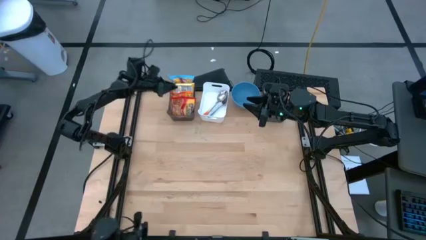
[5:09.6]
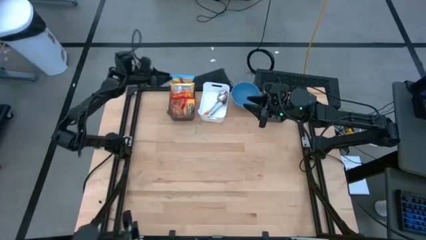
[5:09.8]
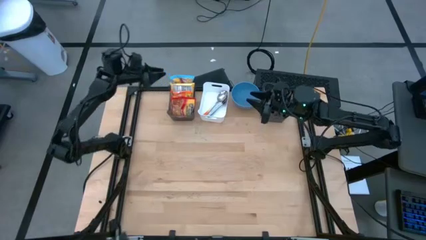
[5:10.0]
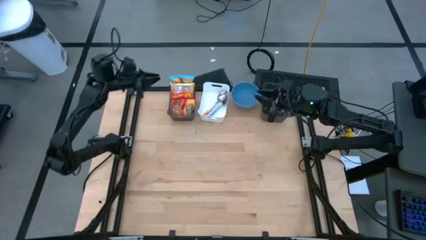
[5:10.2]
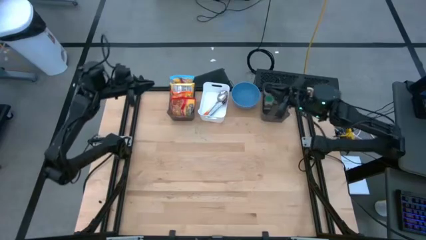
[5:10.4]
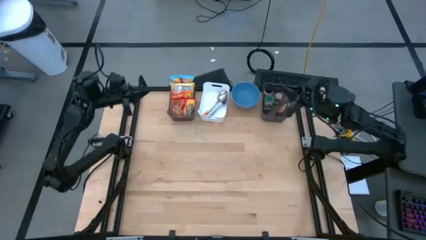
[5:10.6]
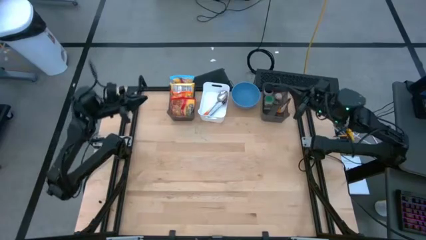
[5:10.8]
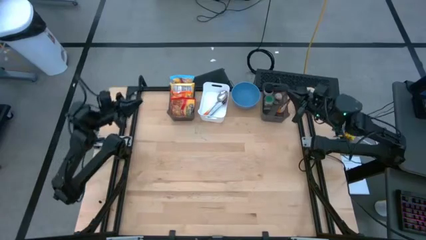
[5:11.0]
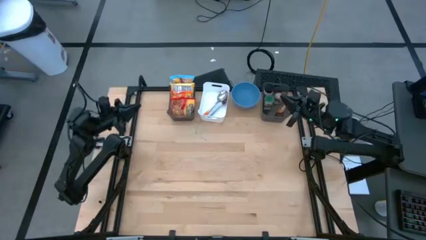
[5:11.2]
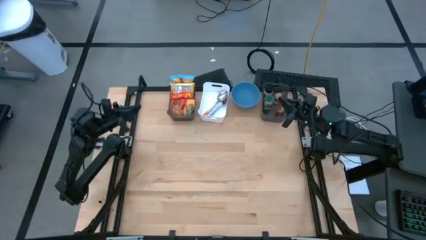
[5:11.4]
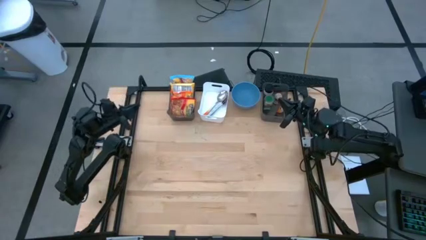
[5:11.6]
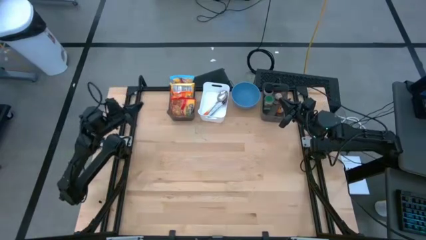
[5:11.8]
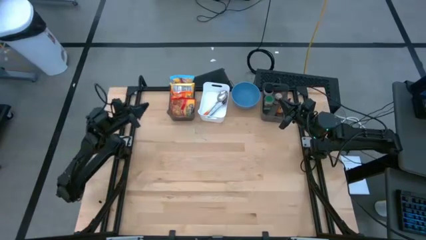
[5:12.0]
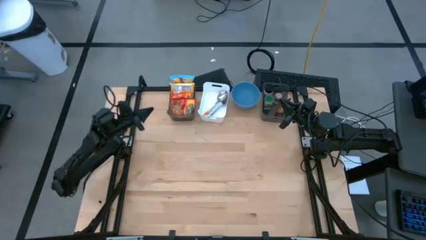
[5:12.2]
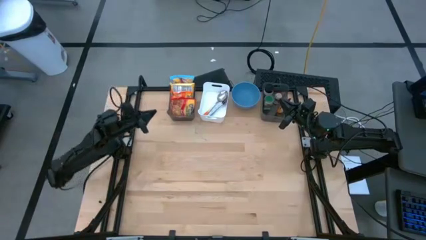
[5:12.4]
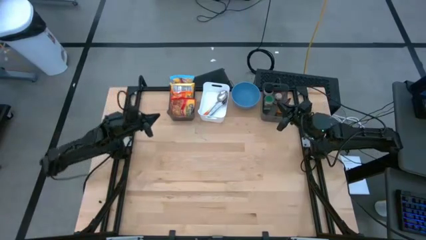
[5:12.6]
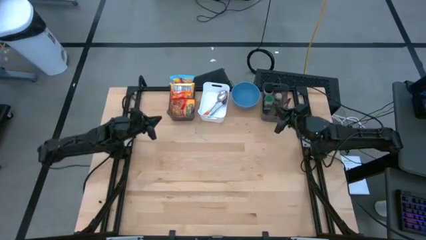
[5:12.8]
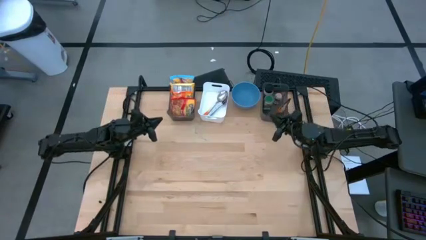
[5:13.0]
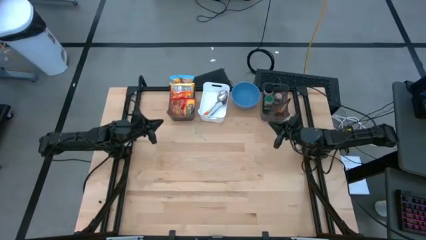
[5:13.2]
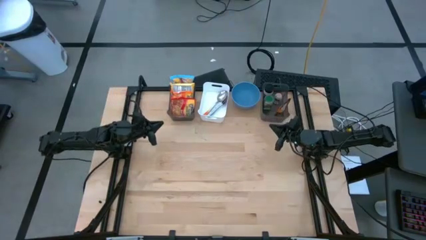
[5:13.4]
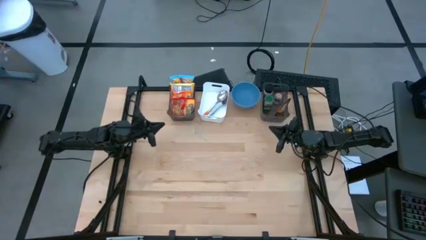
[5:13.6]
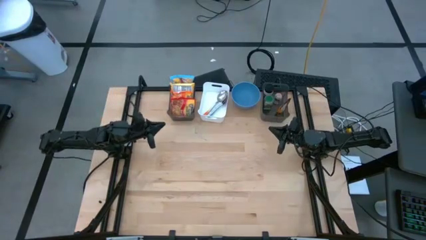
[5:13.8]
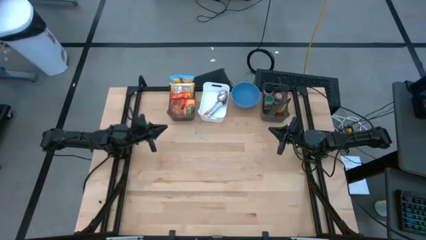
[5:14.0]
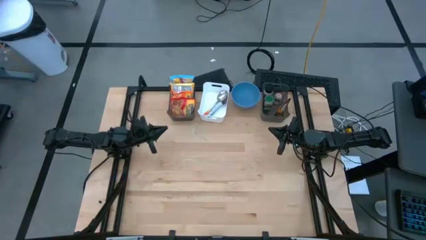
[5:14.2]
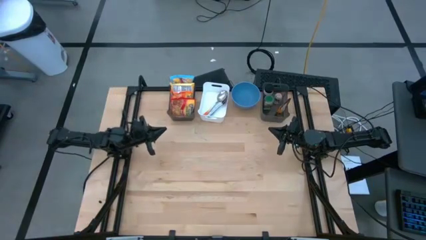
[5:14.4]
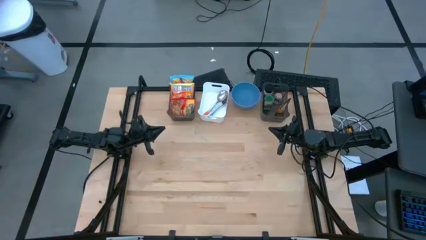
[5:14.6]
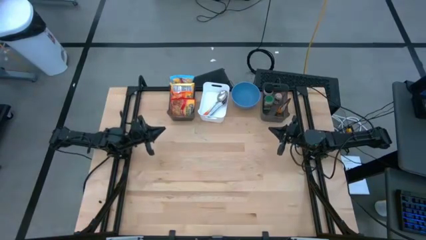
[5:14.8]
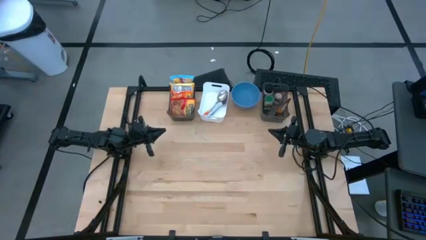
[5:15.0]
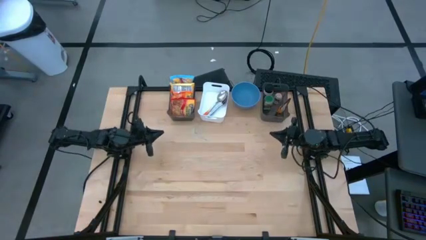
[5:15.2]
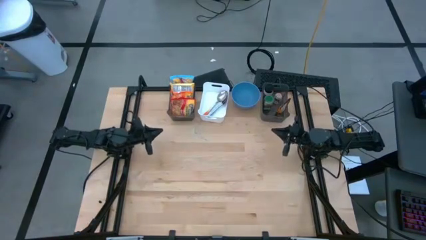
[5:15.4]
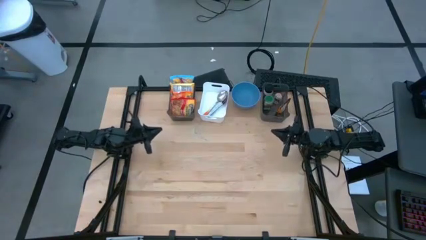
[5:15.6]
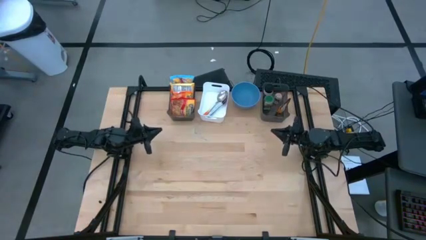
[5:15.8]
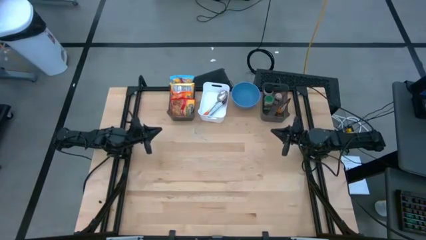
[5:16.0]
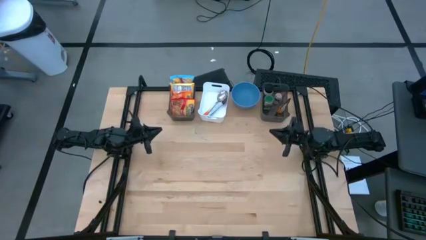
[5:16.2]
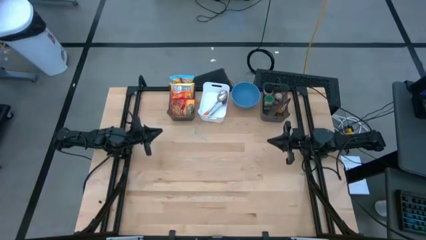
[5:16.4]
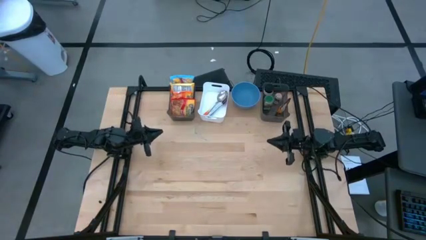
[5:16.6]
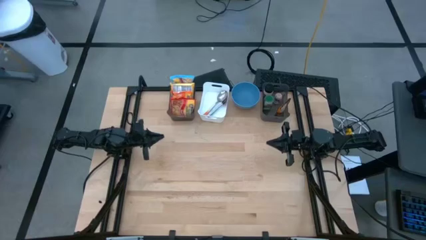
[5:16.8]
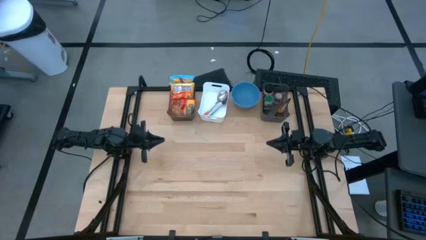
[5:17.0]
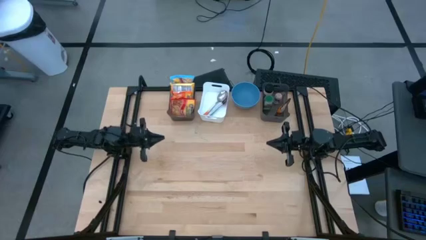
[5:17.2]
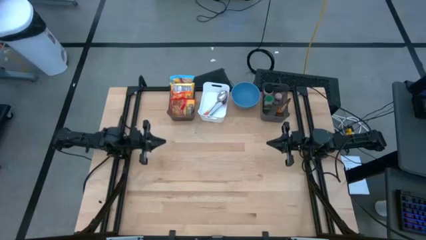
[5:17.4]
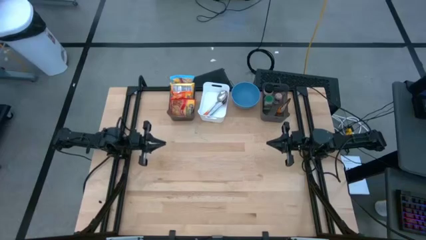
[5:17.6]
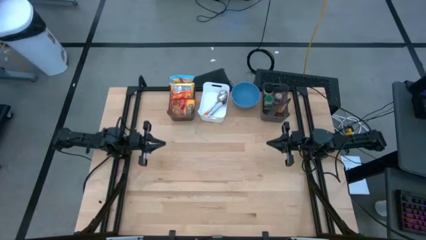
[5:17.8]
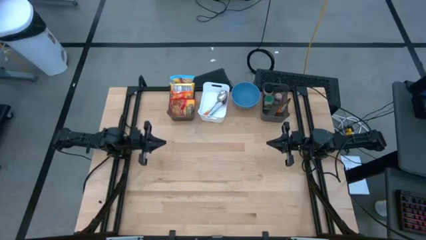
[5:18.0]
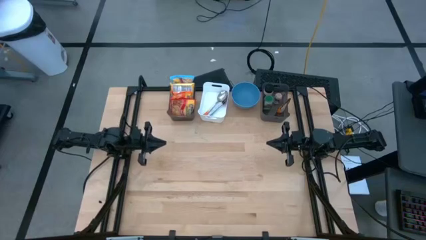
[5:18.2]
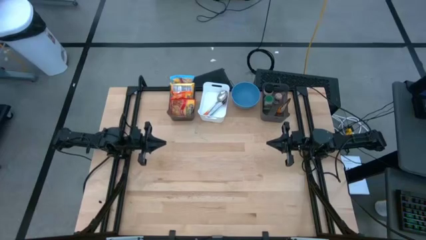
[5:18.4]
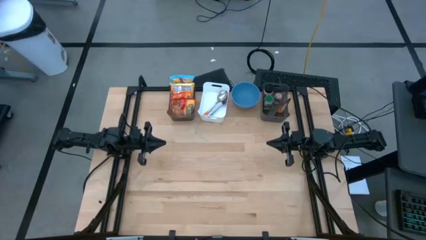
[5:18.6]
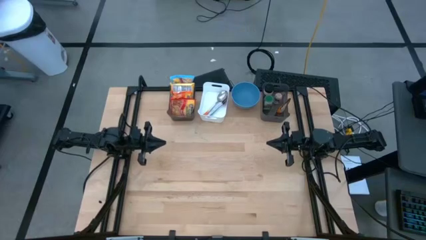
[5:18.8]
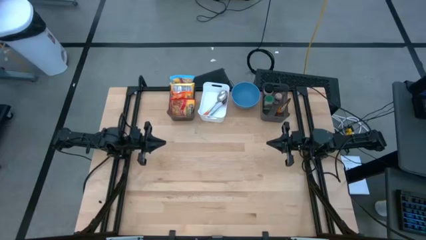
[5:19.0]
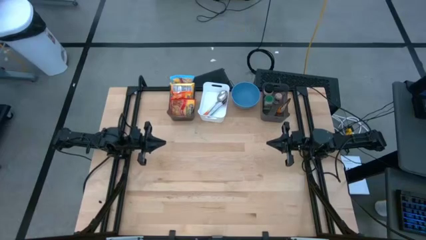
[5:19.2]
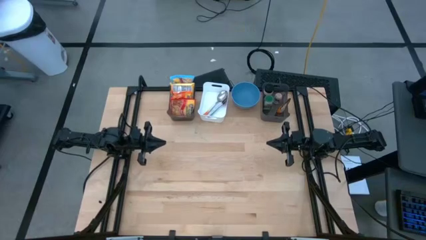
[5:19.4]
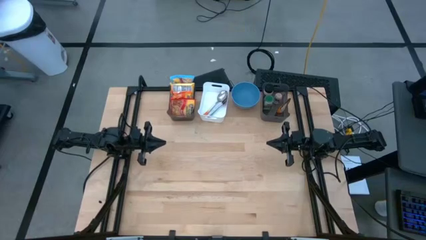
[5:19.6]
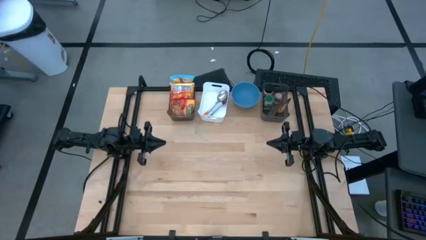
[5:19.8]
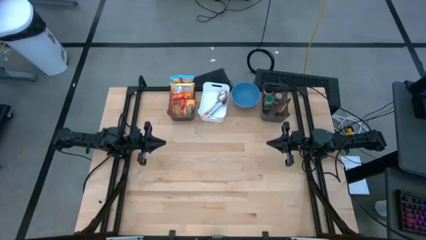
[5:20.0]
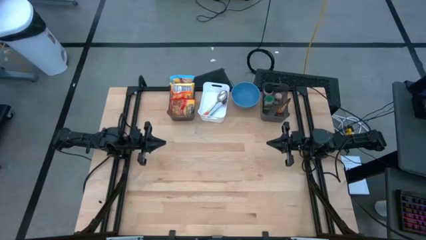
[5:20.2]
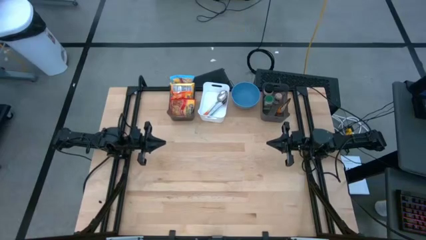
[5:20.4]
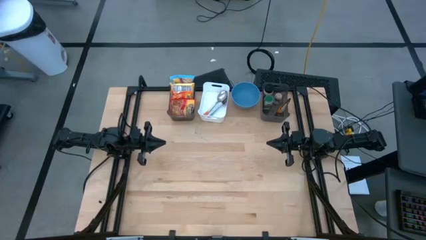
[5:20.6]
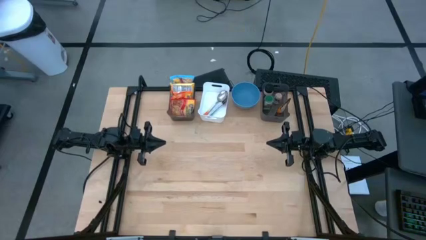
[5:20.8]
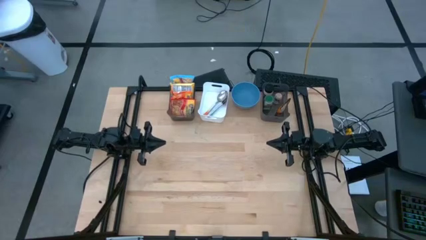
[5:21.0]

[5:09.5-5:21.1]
Task: Pick & Place Food Item
Return to home position

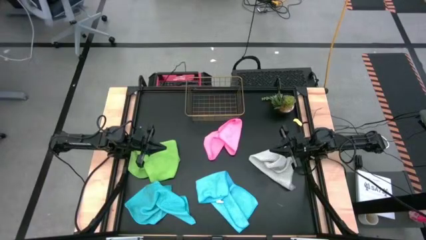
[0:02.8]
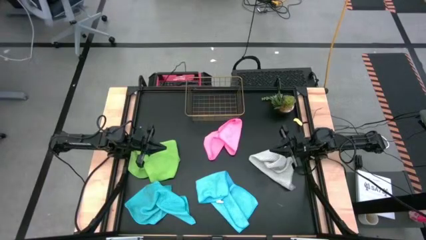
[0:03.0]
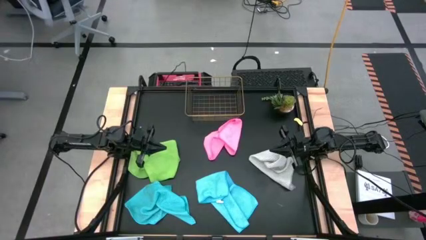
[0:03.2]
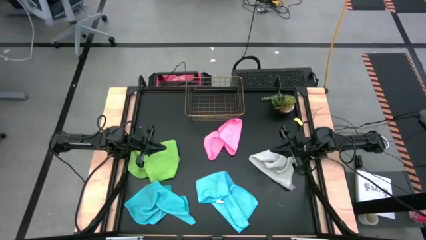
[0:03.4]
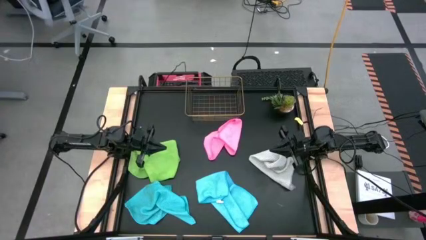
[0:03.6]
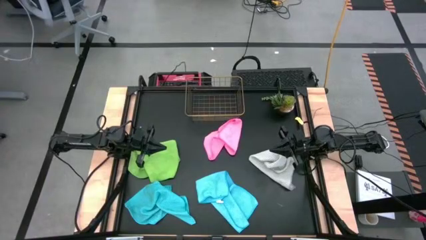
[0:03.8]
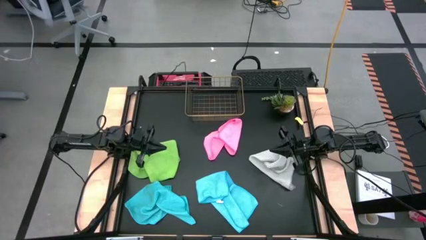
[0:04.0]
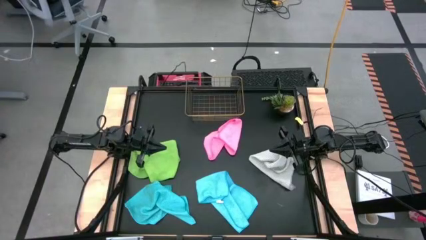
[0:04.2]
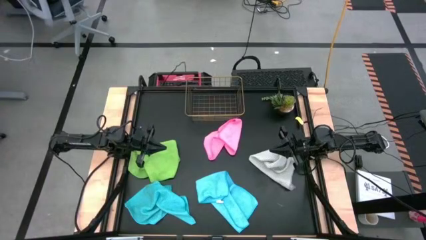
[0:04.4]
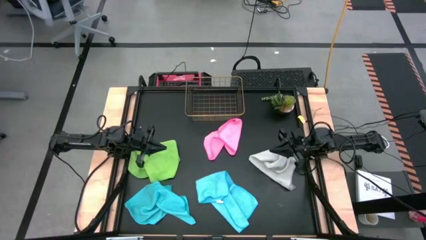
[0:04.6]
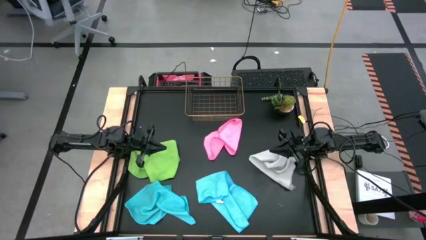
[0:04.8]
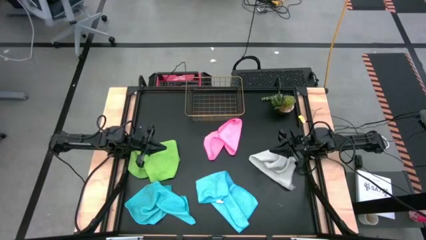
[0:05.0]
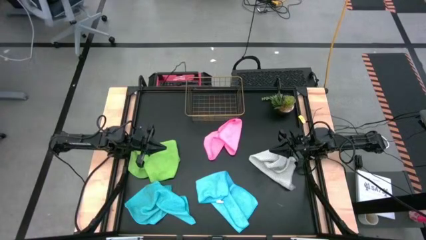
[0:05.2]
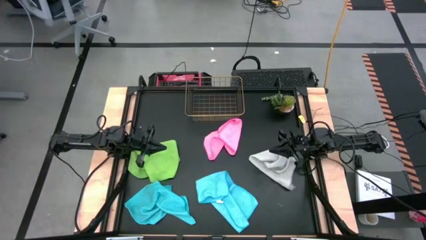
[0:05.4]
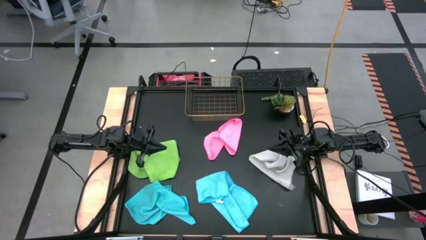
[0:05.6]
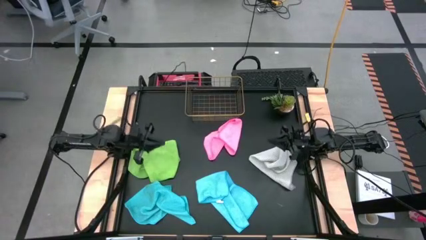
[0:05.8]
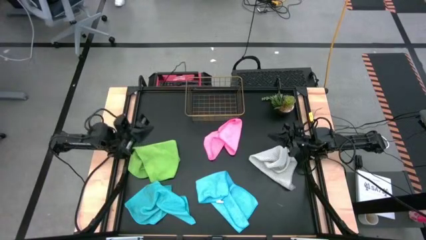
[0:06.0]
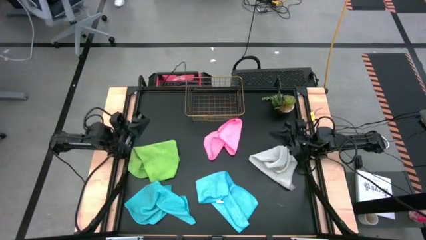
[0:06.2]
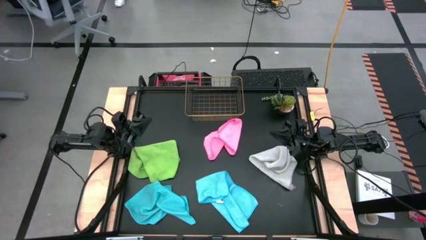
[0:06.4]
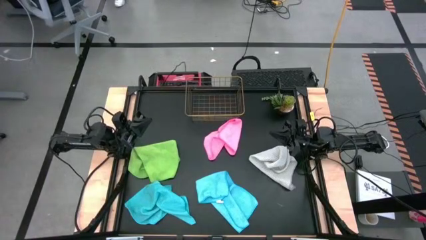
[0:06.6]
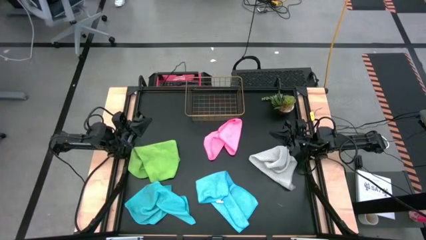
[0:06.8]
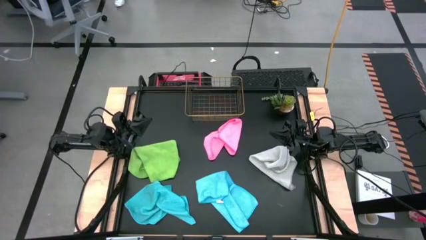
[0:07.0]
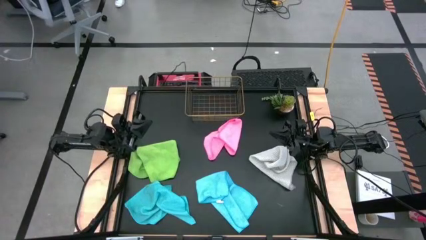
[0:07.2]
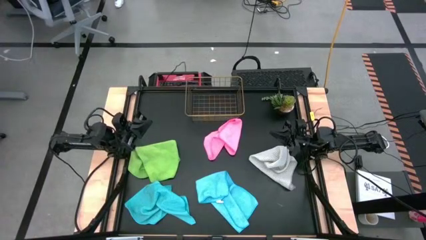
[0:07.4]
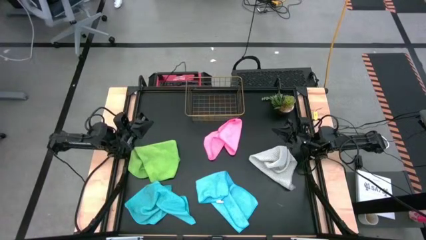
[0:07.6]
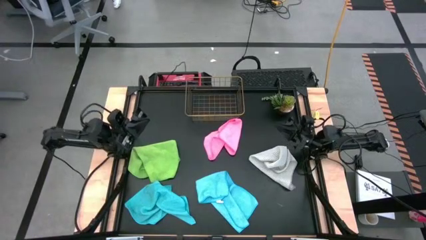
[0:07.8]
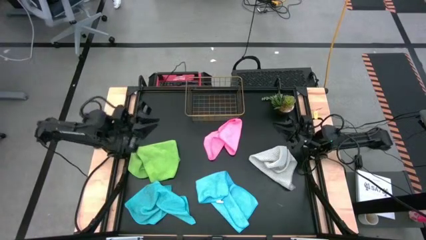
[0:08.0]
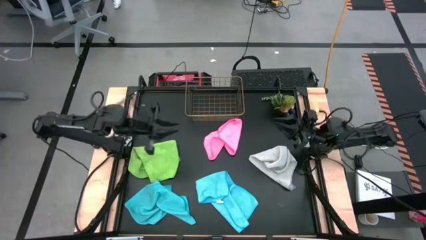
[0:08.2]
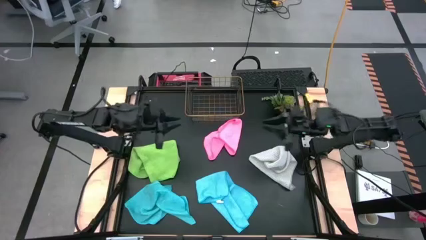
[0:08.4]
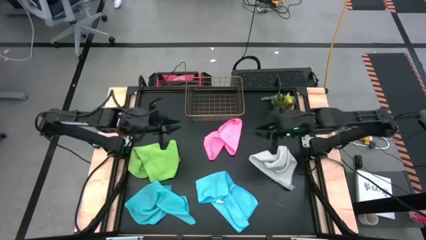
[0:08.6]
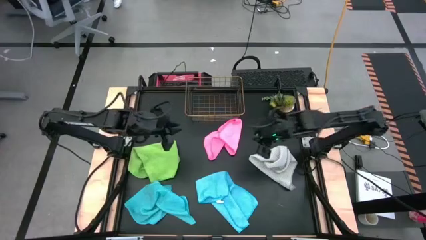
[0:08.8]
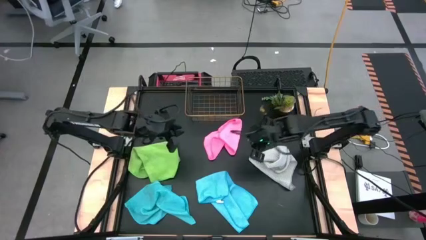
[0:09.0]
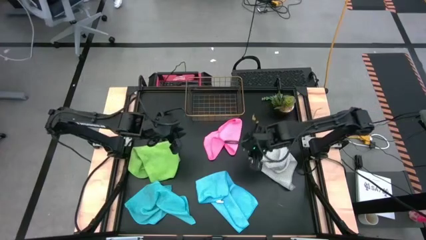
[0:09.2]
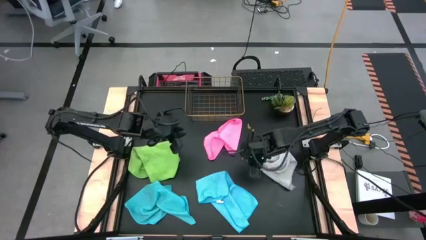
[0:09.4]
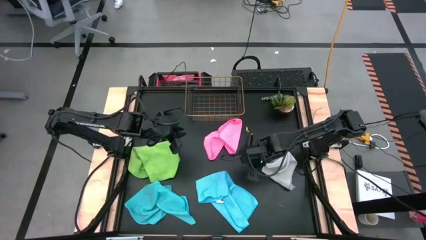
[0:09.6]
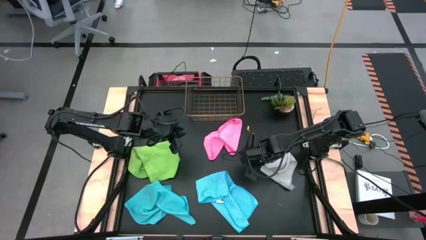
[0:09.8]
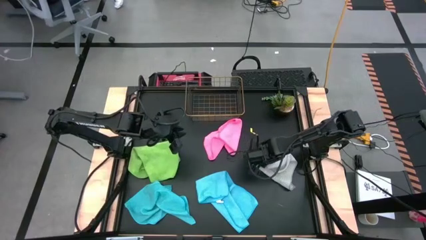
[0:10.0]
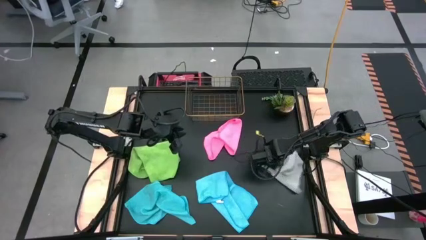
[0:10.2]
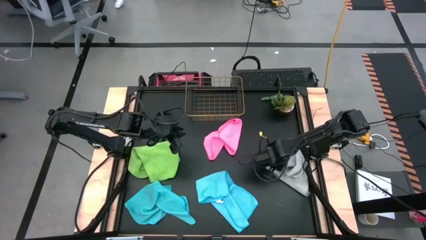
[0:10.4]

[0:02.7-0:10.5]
Task: Fold microfiber towels
Adjust the gray microfiber cloth
